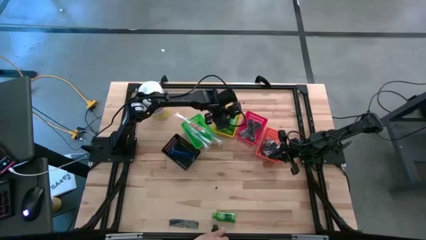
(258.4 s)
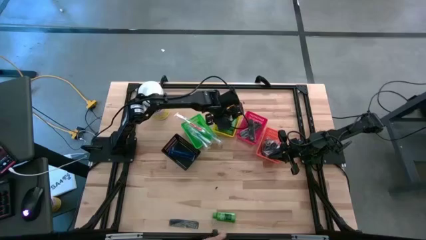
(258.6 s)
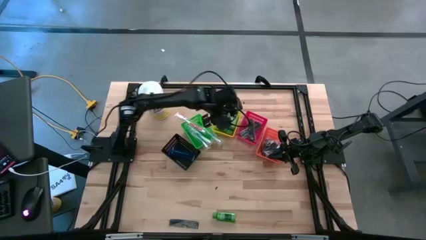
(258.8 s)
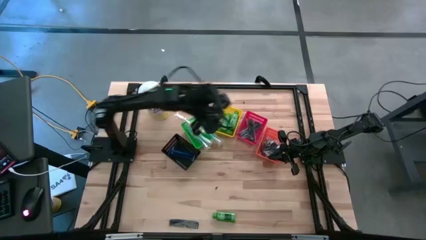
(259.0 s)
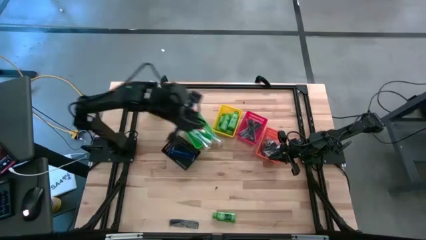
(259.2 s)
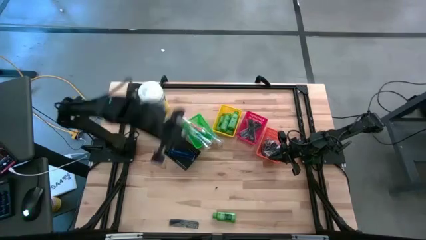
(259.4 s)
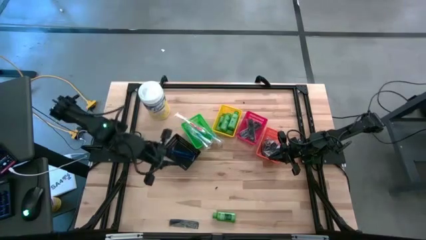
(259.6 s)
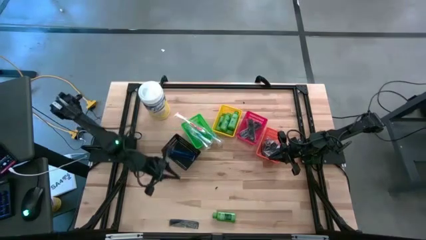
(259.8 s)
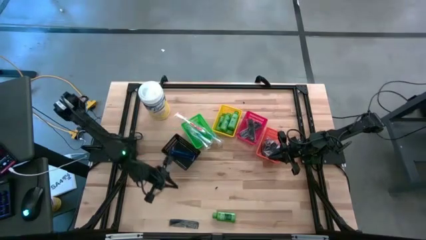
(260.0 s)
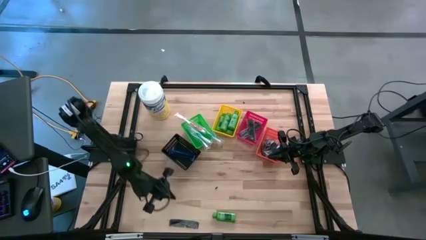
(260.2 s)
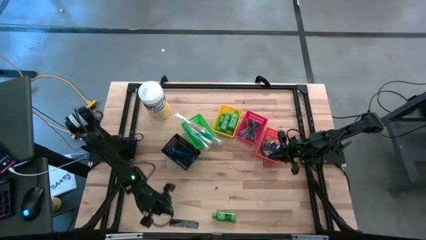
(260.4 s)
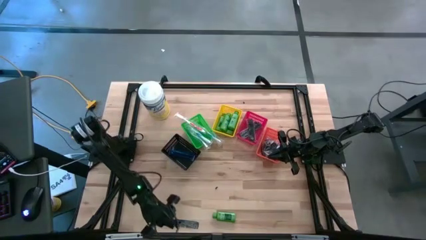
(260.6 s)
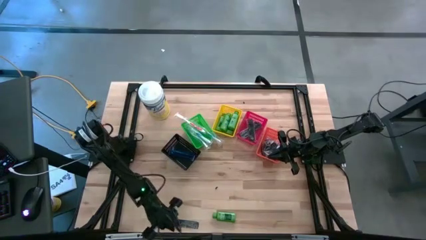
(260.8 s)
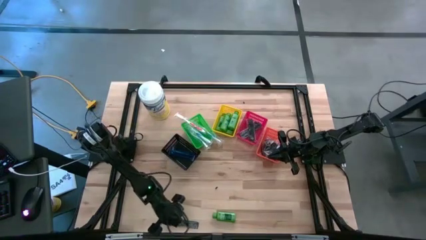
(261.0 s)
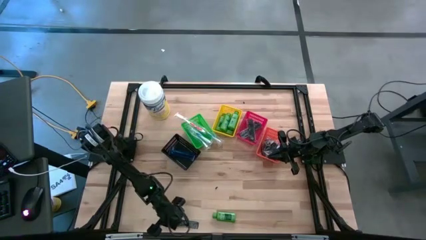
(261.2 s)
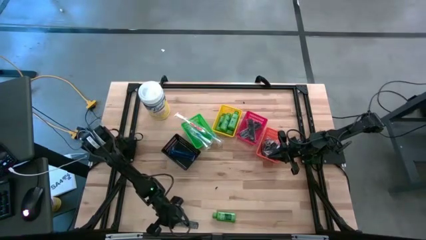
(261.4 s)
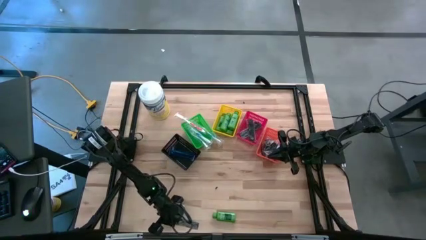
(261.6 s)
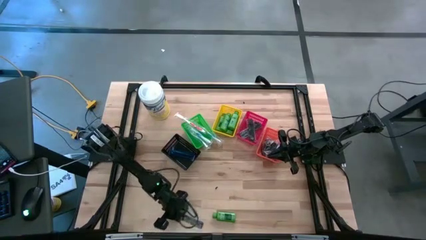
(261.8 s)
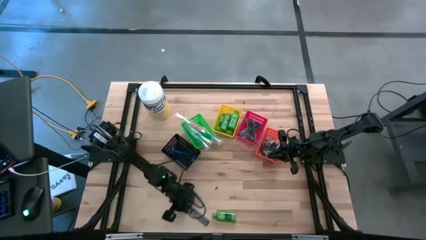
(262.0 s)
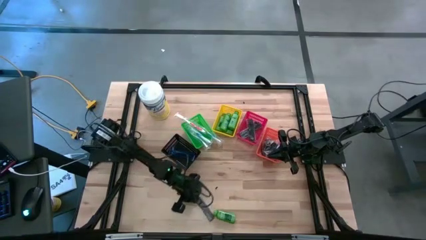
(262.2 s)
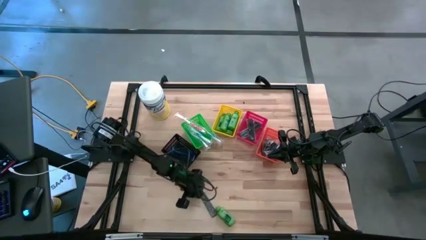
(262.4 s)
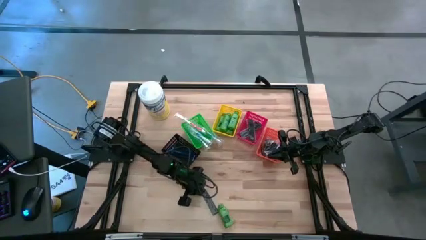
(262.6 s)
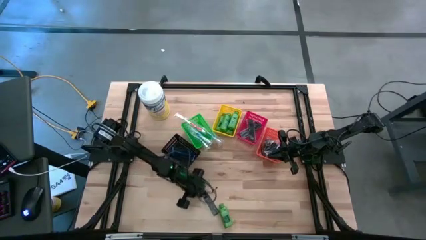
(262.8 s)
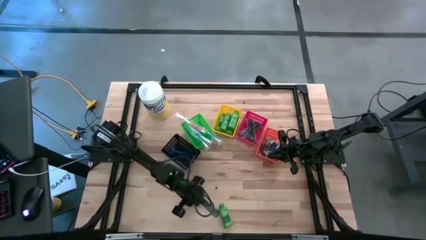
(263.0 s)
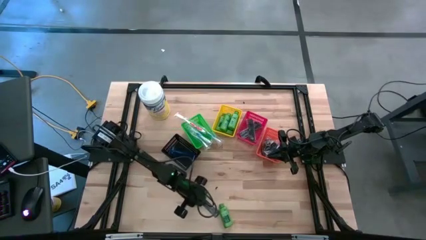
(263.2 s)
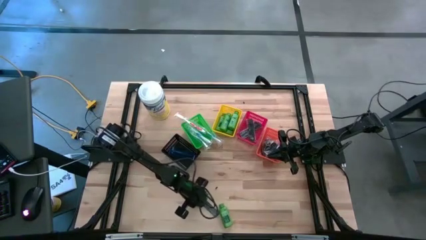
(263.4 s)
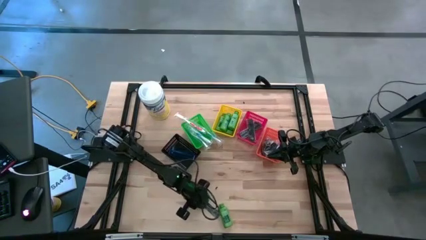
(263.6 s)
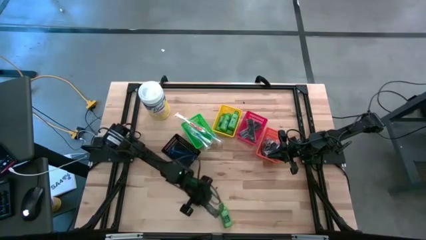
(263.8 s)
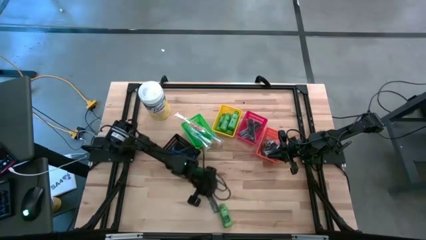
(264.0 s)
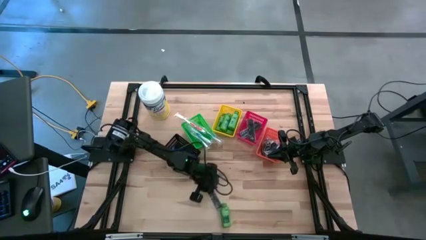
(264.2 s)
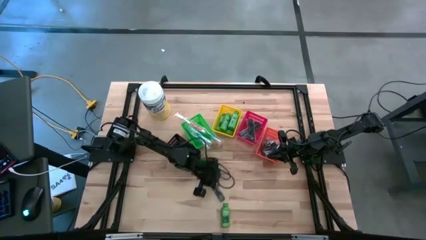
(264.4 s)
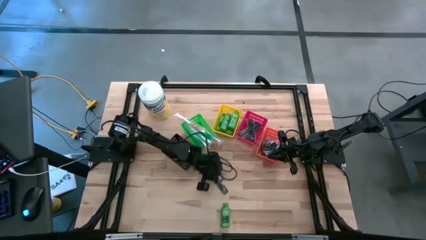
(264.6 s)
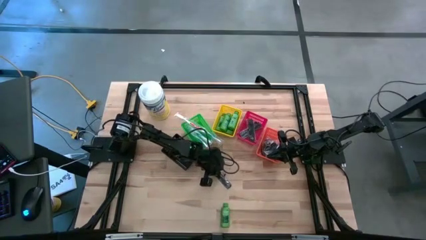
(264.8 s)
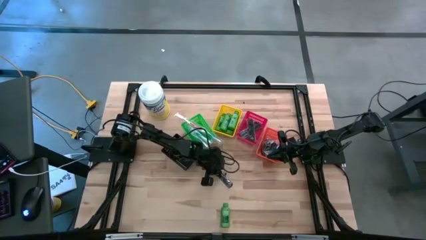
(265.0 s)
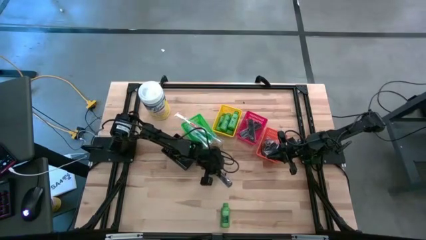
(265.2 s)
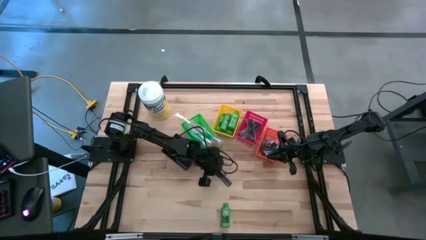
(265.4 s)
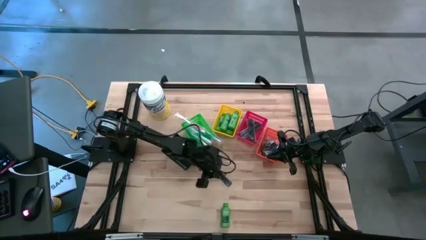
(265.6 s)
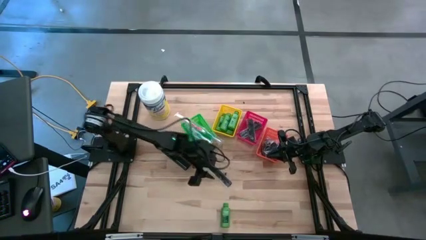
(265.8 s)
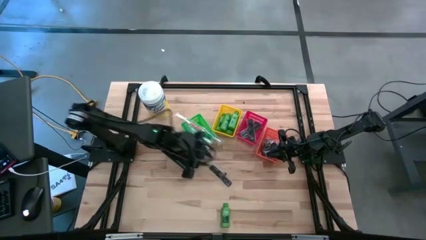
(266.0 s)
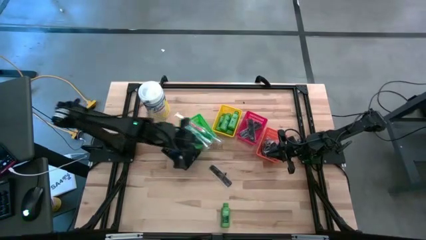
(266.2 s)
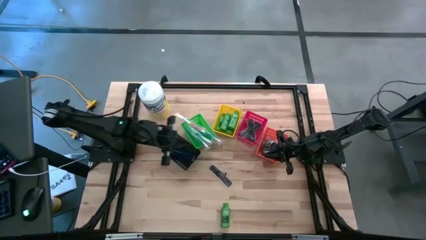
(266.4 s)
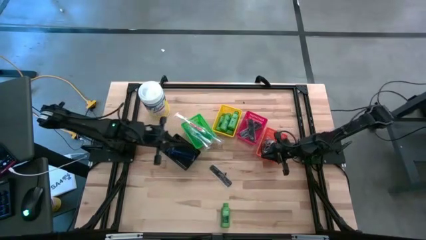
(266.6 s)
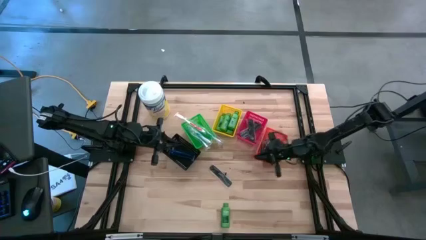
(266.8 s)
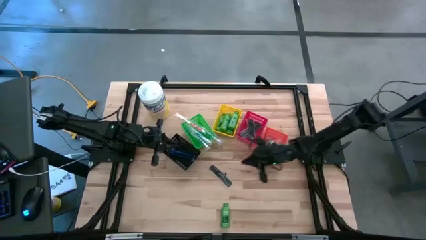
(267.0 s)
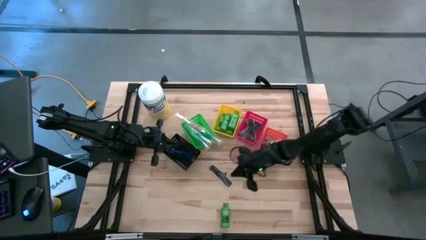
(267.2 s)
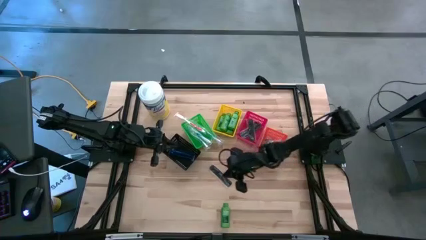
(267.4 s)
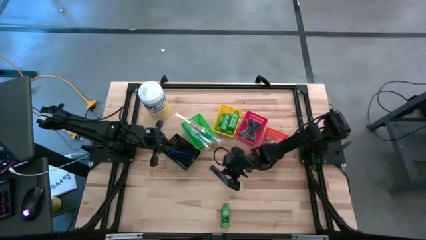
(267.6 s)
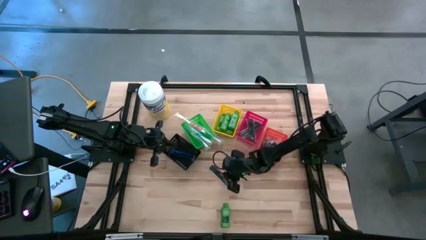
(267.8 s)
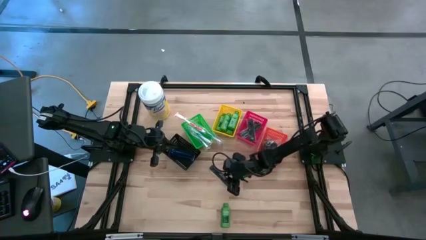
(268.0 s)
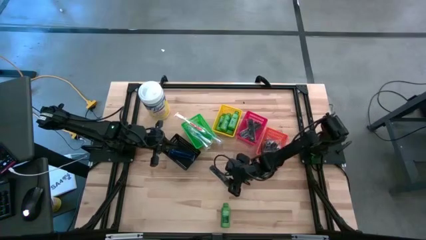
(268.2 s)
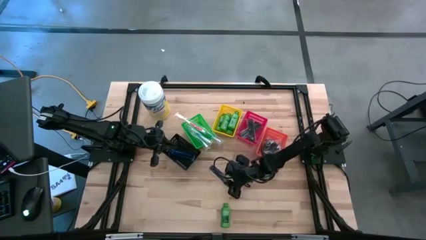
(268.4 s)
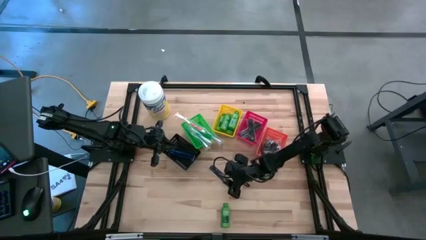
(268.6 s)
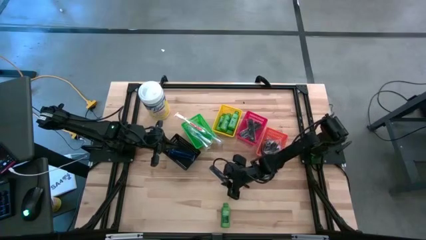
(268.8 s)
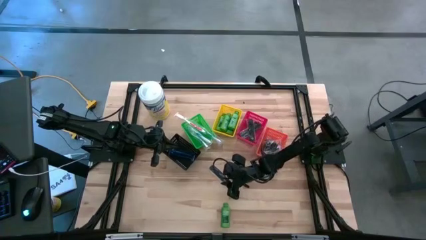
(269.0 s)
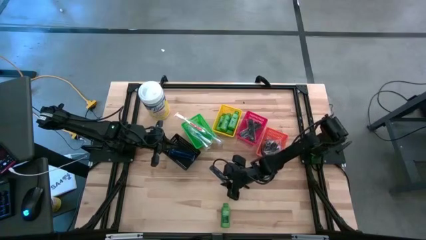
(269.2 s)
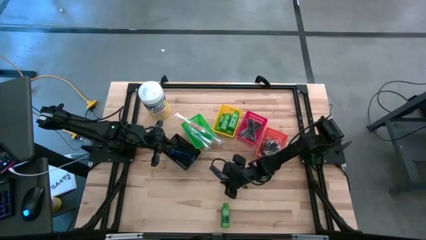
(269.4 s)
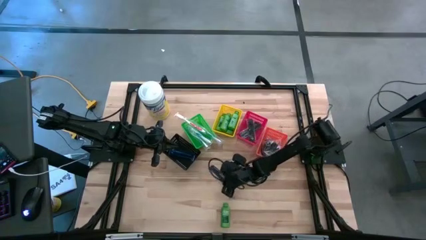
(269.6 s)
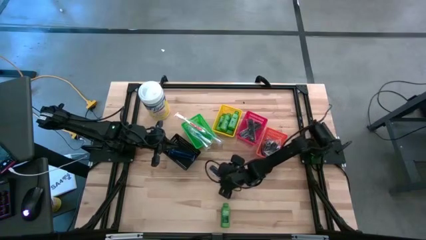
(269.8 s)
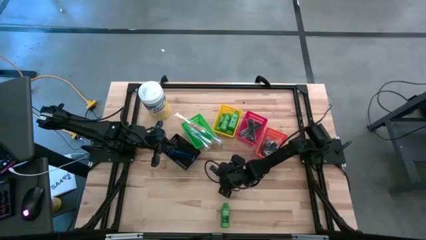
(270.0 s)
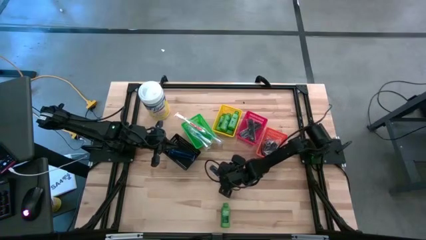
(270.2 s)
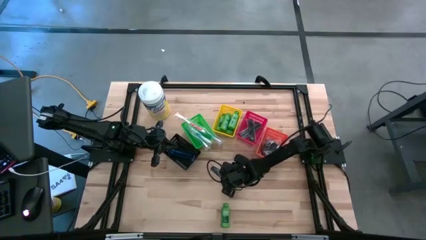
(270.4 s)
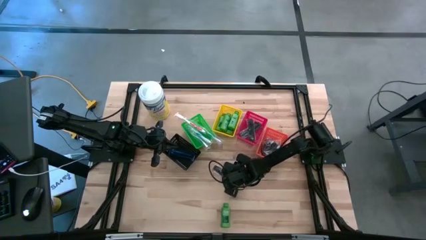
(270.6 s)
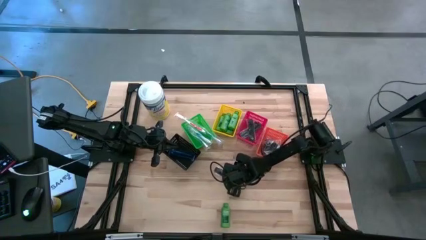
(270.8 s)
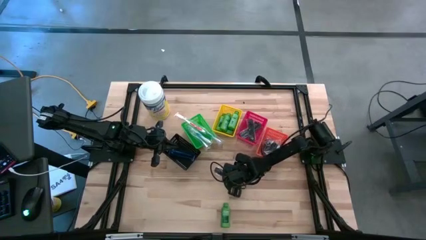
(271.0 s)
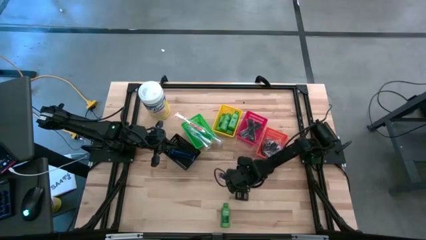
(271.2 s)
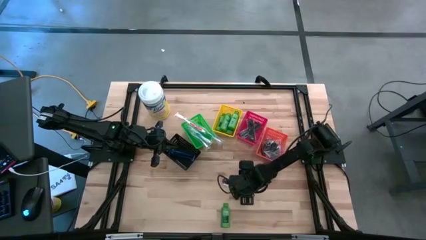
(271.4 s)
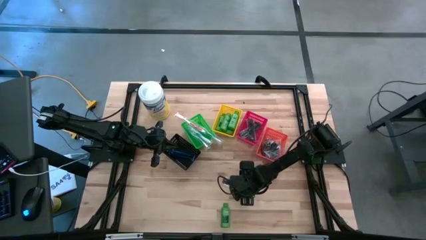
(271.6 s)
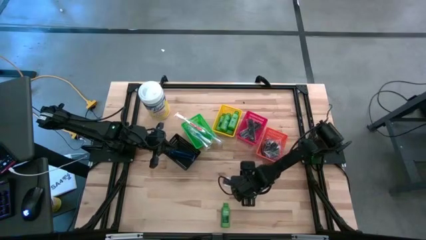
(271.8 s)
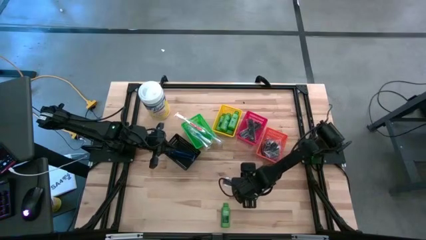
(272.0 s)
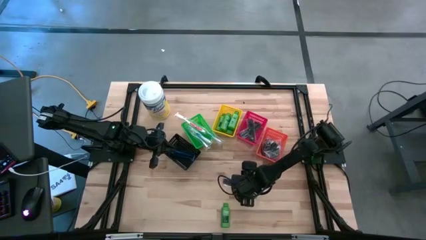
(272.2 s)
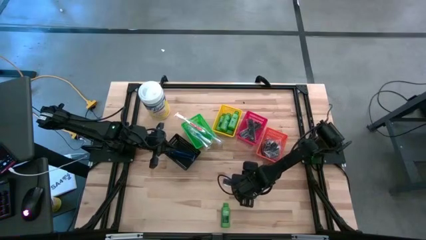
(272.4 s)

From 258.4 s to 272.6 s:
Task: Pick & Place Travel size toiletries
Put the black comb into the red bin

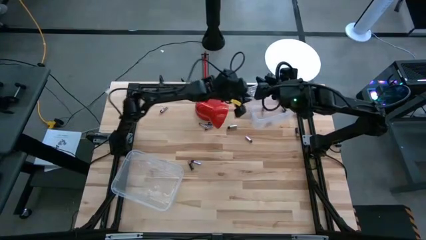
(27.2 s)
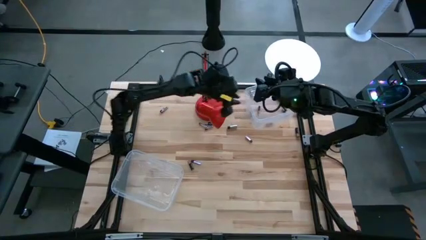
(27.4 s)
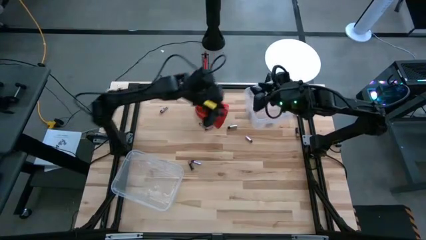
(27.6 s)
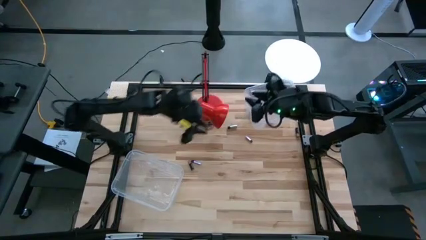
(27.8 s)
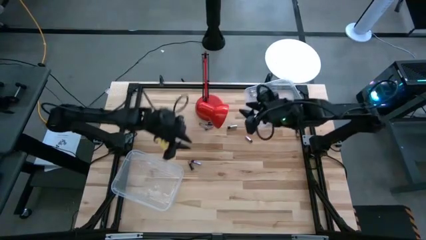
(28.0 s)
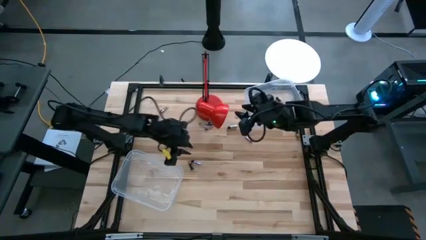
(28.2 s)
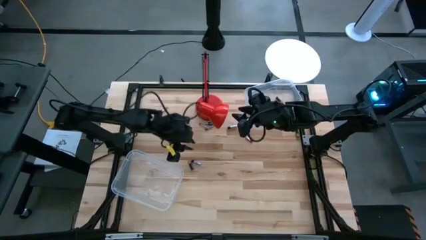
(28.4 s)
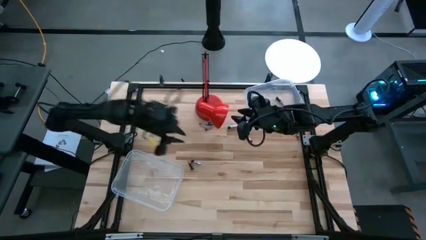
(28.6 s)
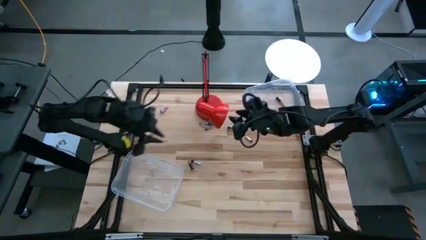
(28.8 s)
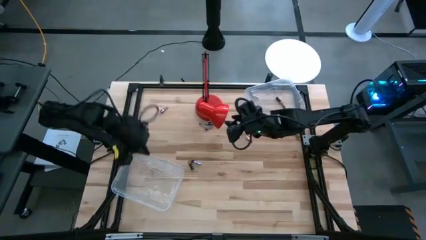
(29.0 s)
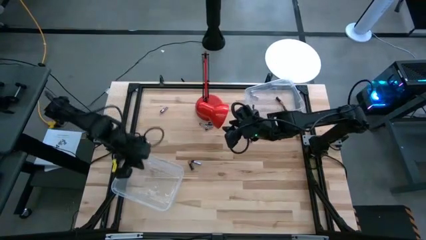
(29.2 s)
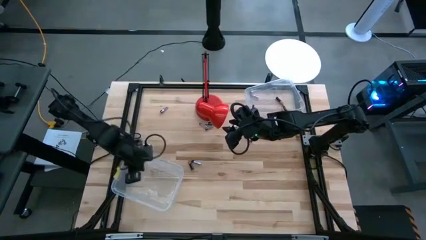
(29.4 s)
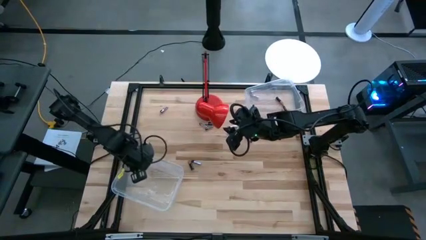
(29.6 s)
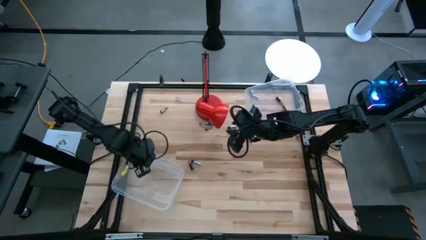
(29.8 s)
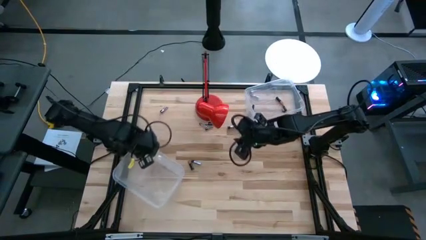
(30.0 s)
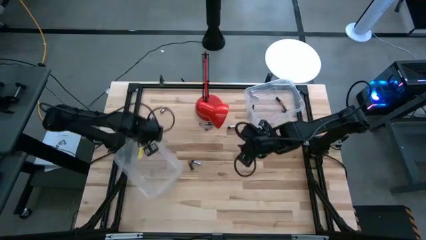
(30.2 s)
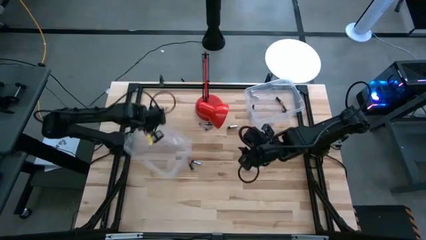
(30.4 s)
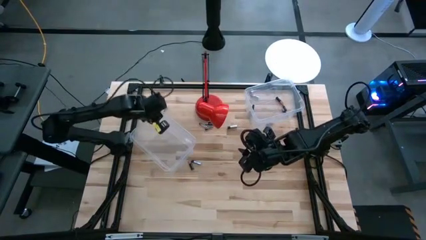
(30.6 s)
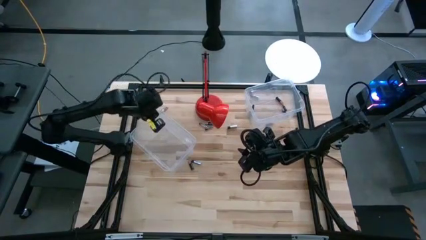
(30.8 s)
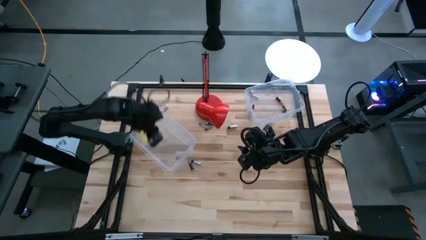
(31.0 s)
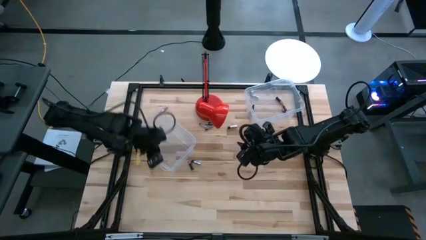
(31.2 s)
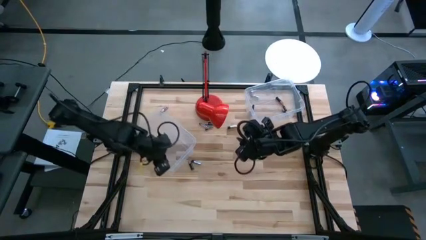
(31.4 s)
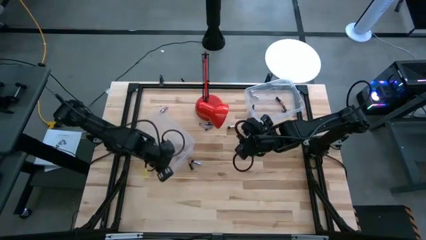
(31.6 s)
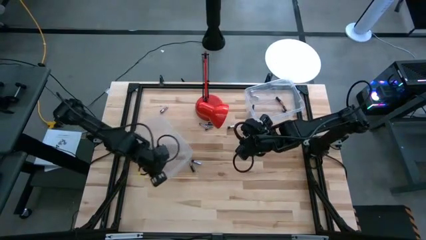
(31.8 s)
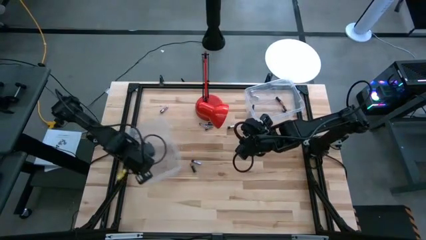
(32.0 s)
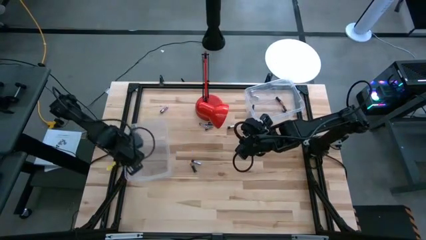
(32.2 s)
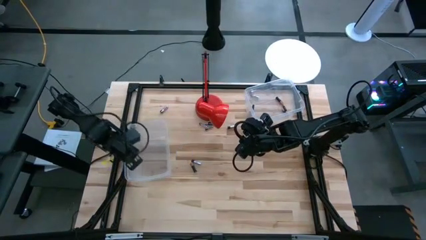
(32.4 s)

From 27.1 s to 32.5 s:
Task: Sort batteries
Adjust the bottom transparent bin
